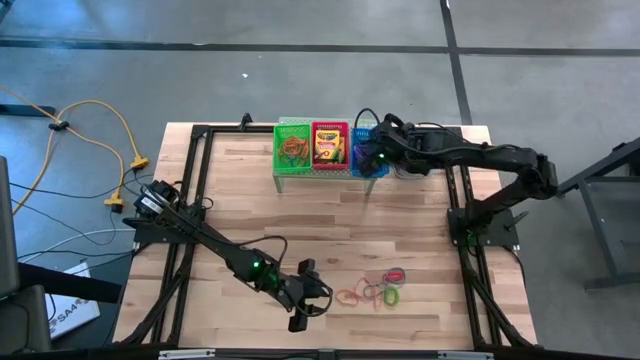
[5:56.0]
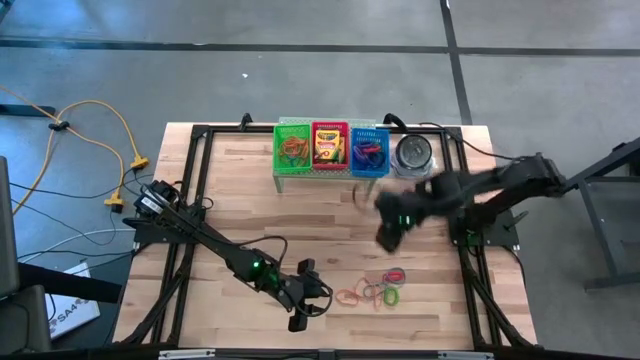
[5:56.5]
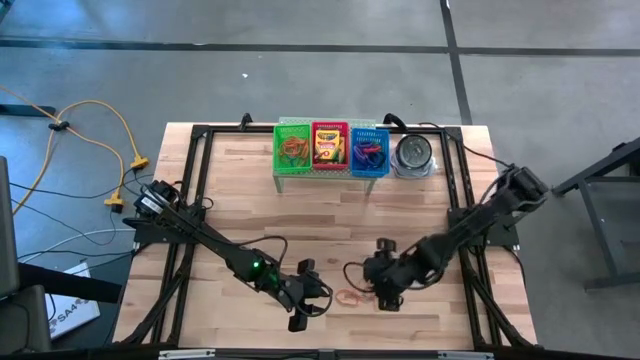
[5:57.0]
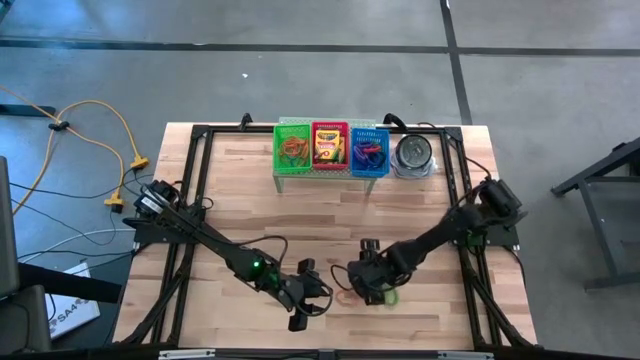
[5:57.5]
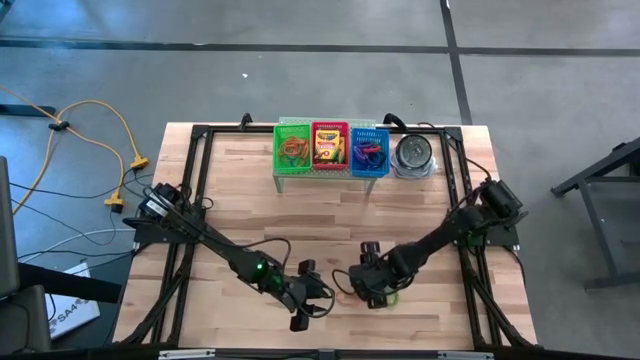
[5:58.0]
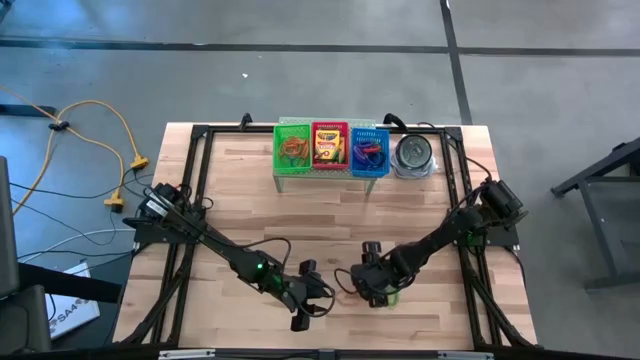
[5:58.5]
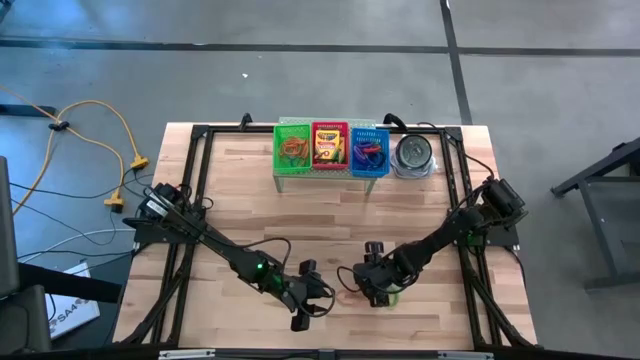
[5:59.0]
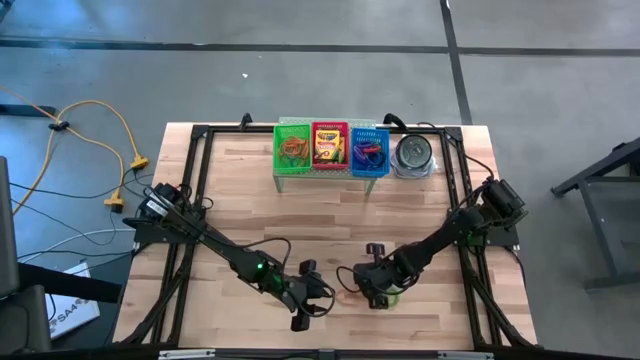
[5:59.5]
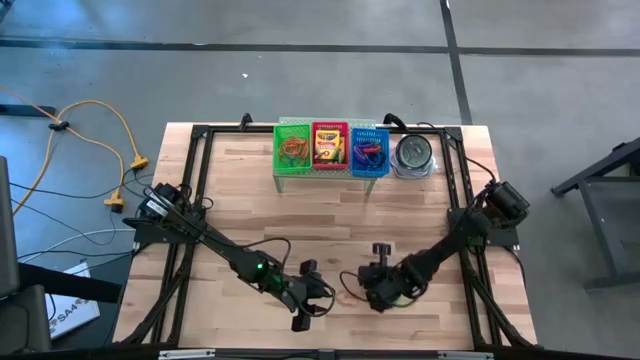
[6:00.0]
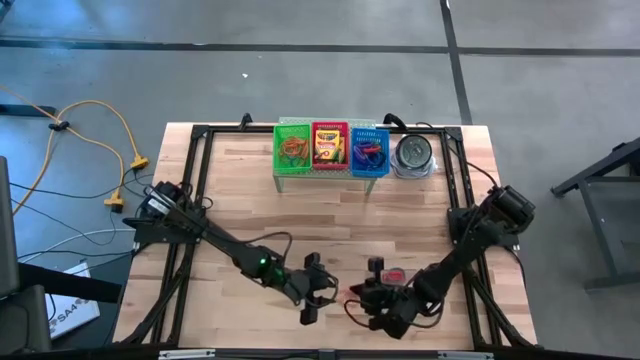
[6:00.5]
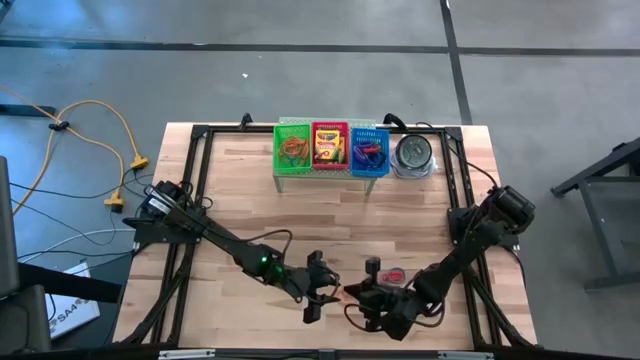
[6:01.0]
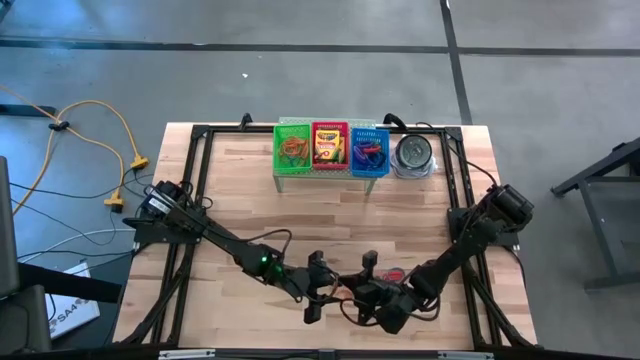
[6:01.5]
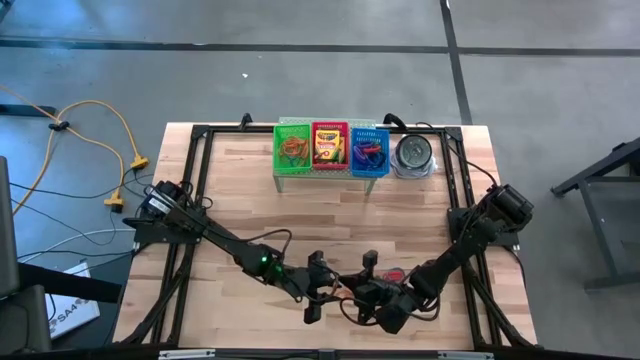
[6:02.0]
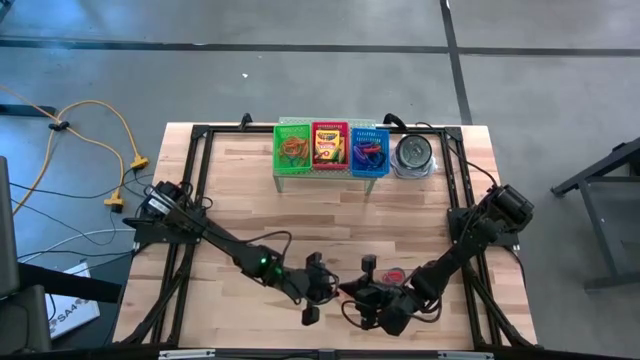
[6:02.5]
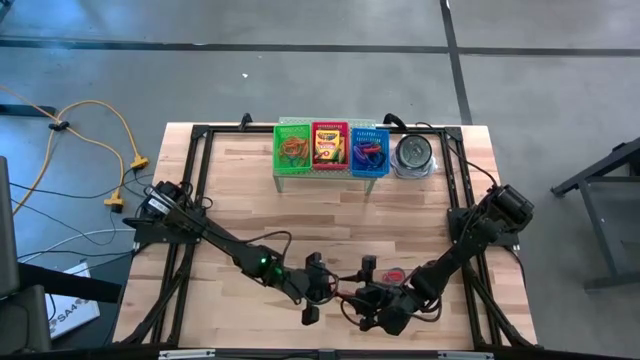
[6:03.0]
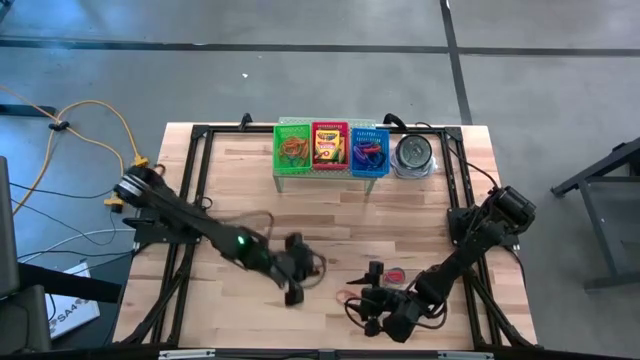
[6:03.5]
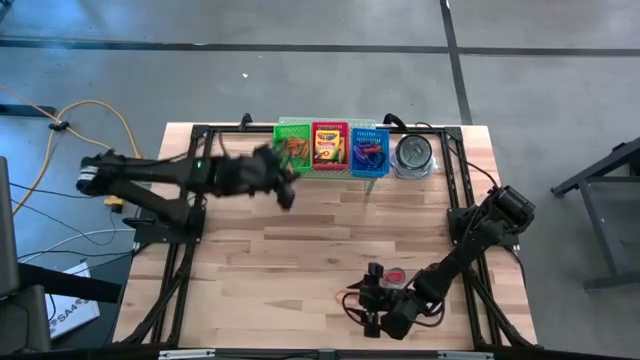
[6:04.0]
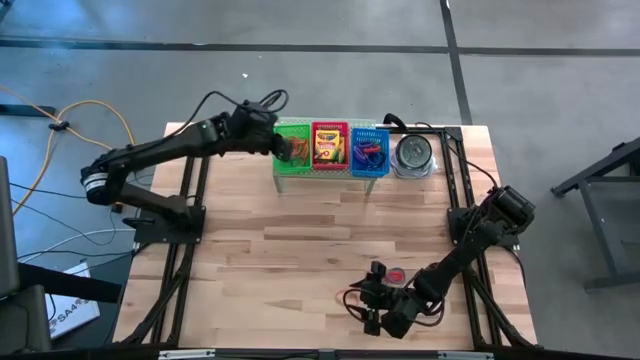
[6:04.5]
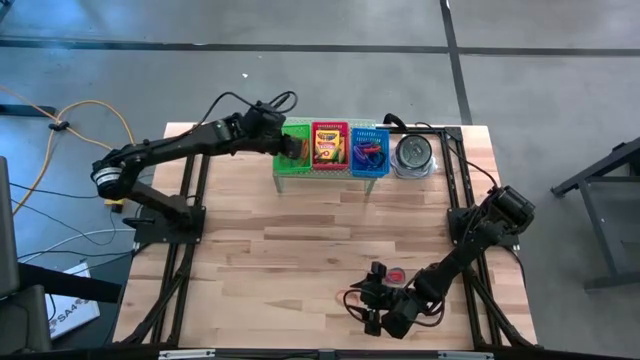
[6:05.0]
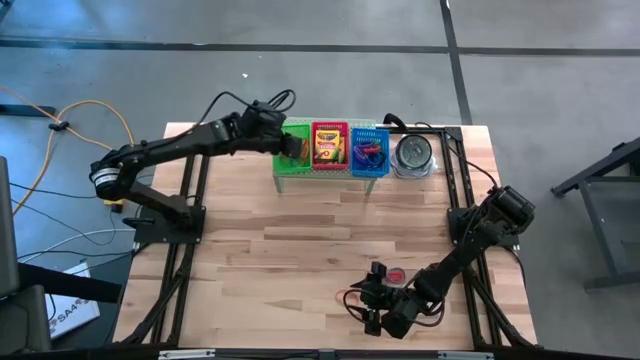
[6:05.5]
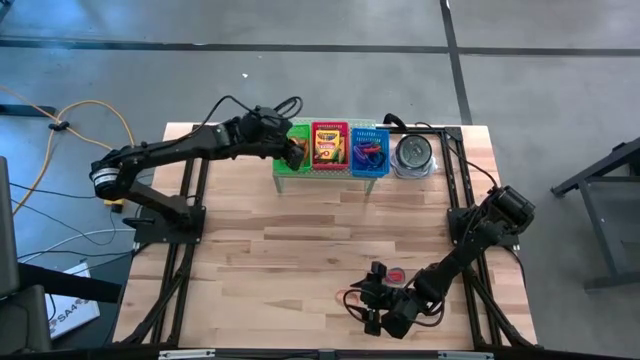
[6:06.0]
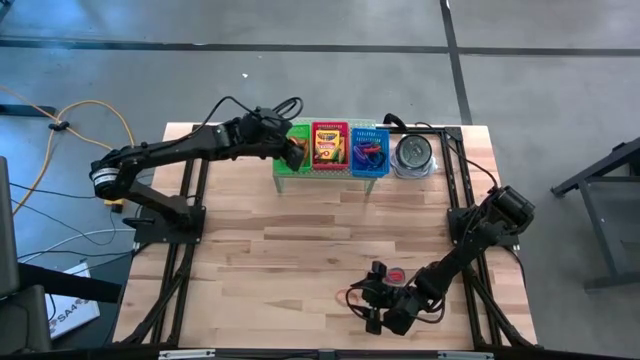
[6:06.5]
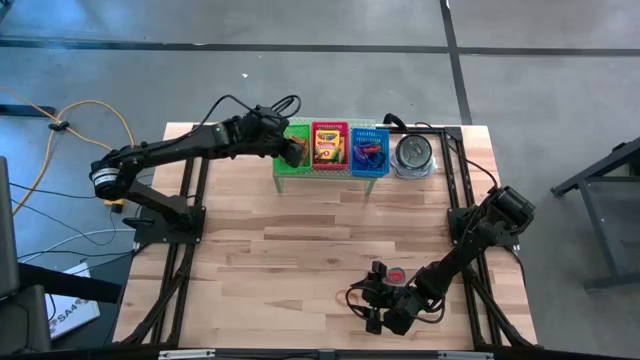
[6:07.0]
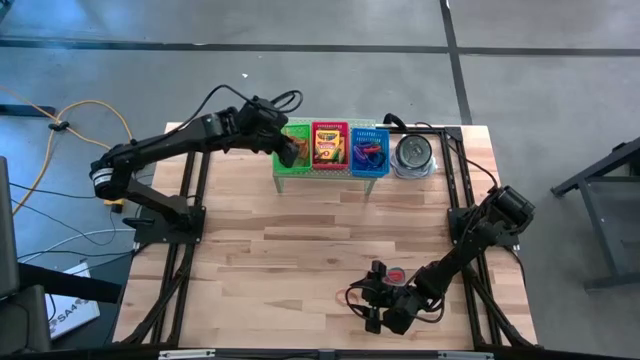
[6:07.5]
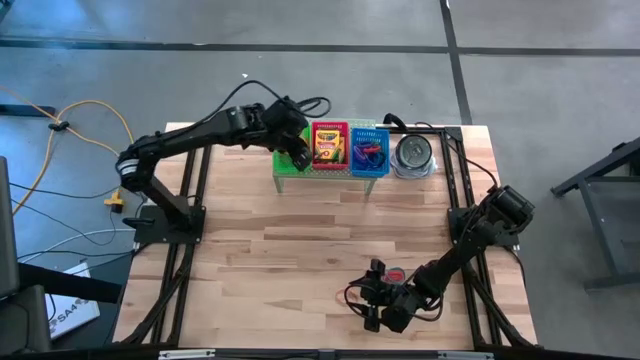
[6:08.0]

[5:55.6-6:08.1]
Task: Pick & Place Office Desk Supplies
Put the middle orange rubber band into the green bin on the shelf
